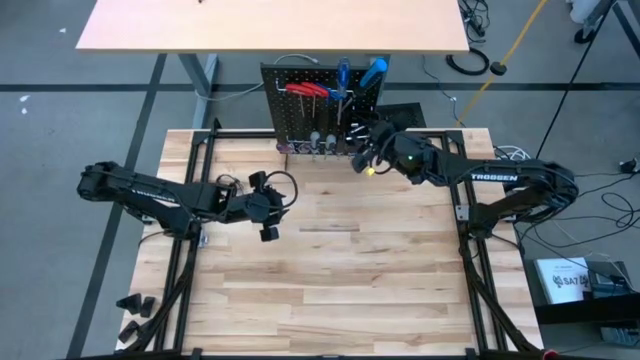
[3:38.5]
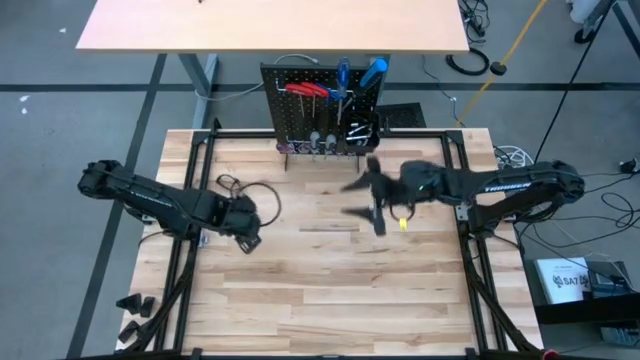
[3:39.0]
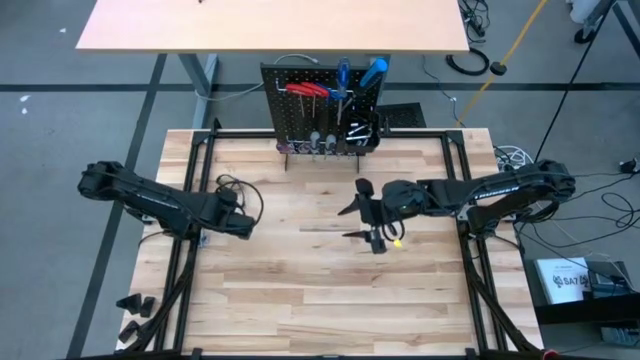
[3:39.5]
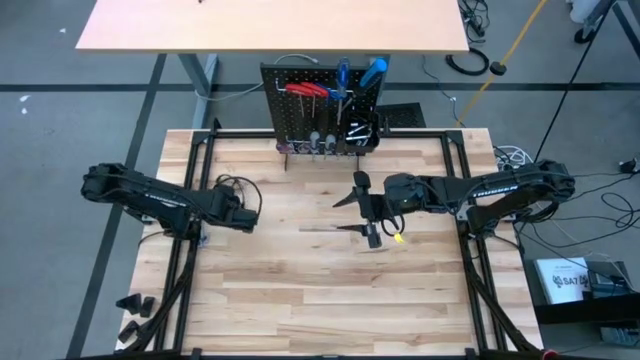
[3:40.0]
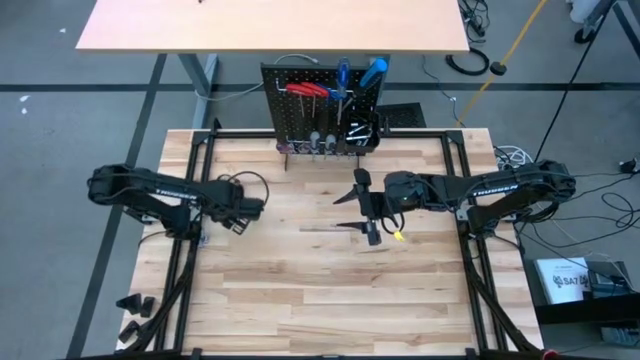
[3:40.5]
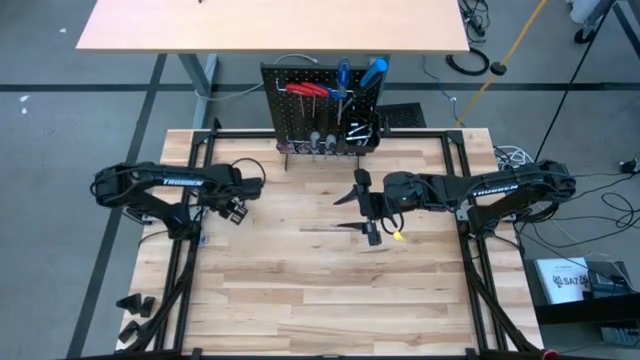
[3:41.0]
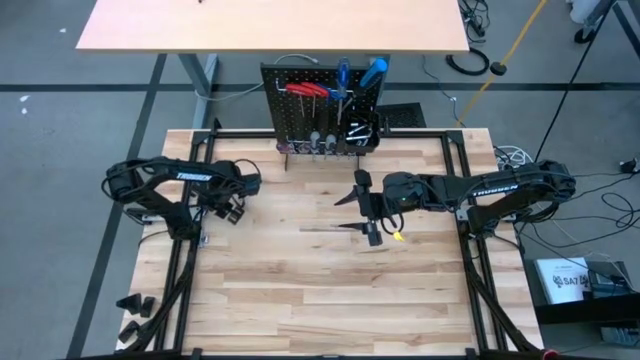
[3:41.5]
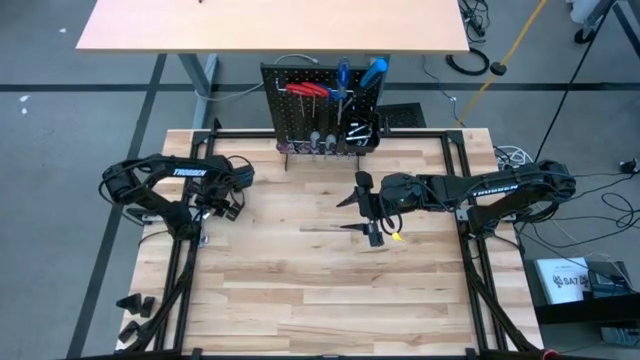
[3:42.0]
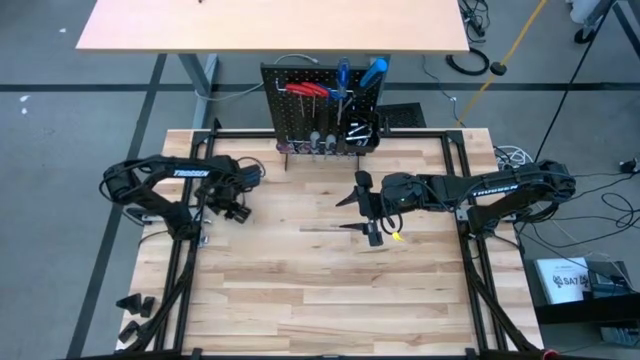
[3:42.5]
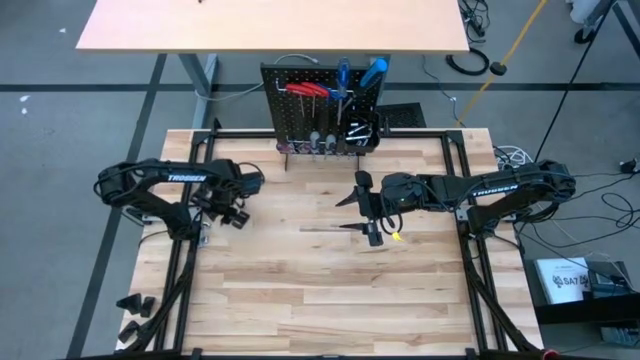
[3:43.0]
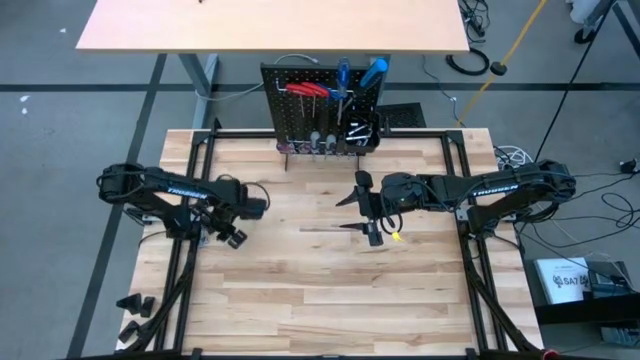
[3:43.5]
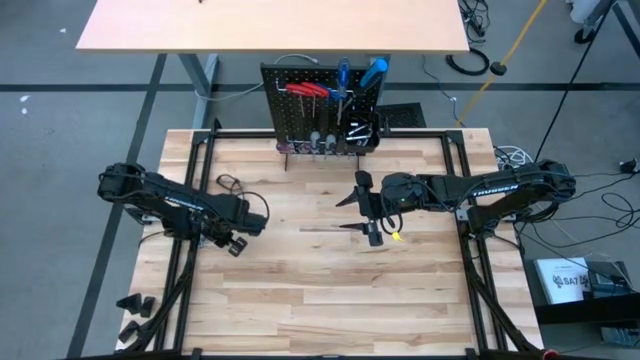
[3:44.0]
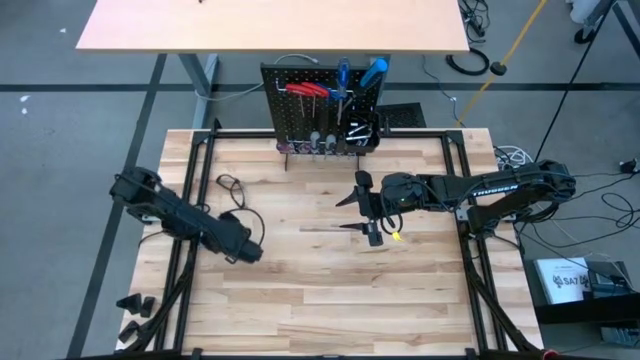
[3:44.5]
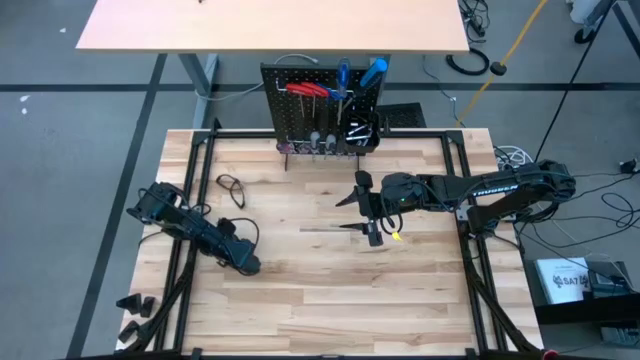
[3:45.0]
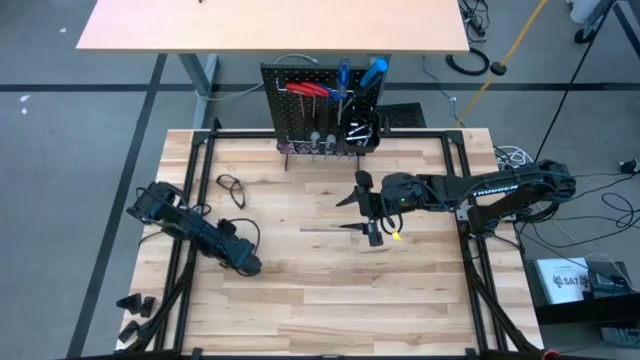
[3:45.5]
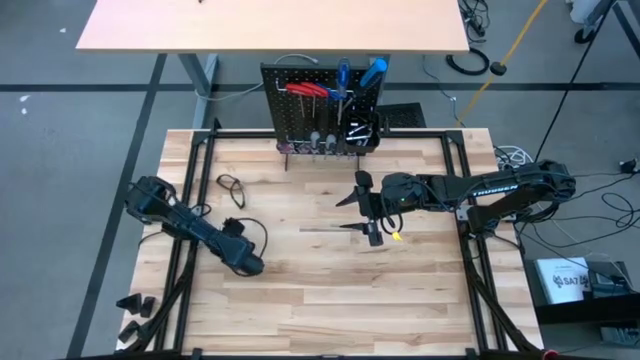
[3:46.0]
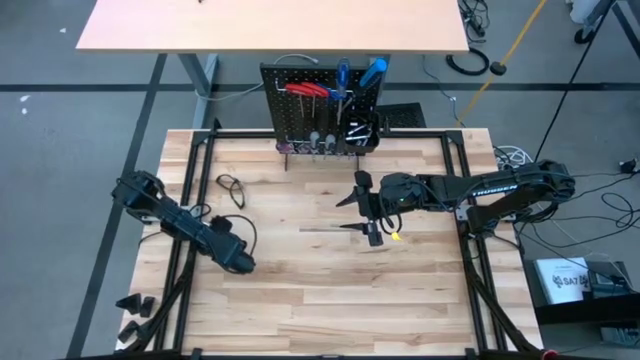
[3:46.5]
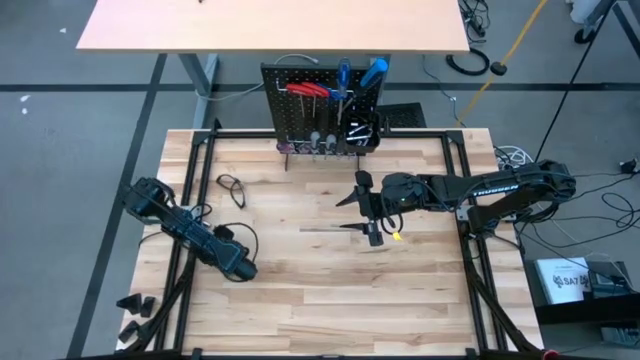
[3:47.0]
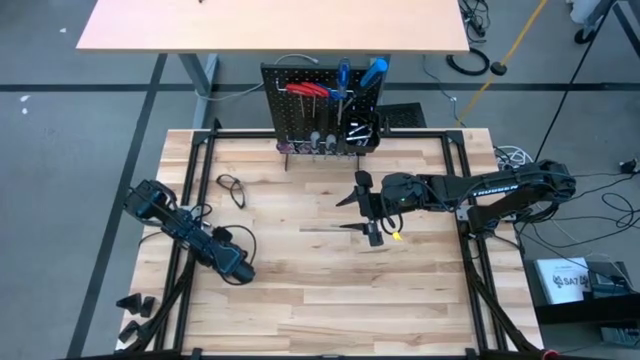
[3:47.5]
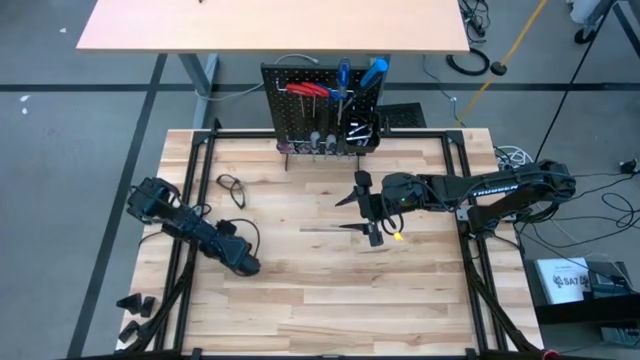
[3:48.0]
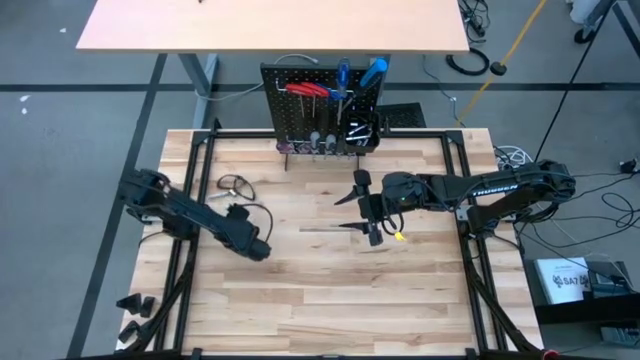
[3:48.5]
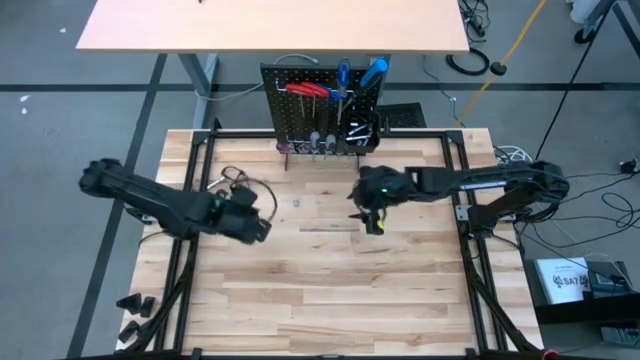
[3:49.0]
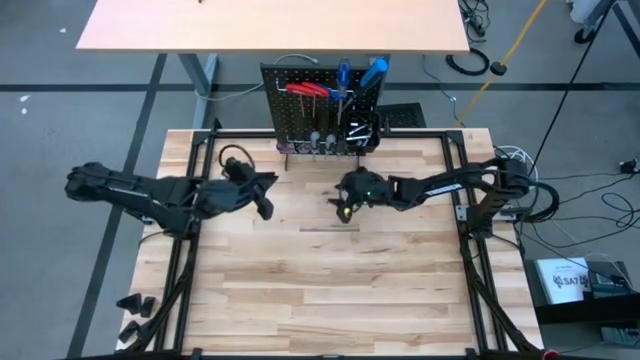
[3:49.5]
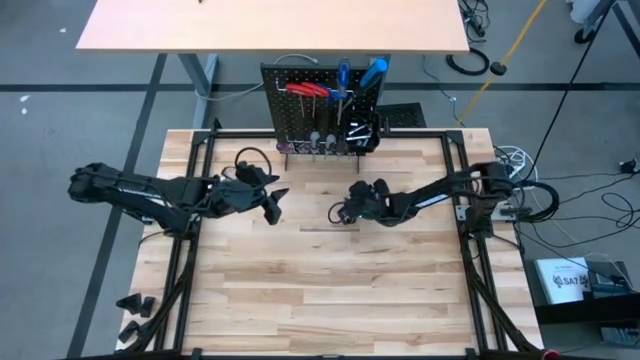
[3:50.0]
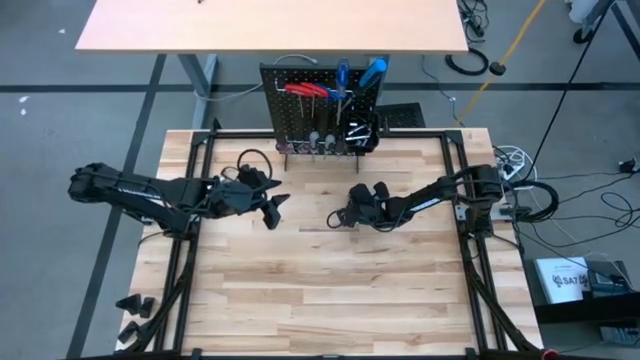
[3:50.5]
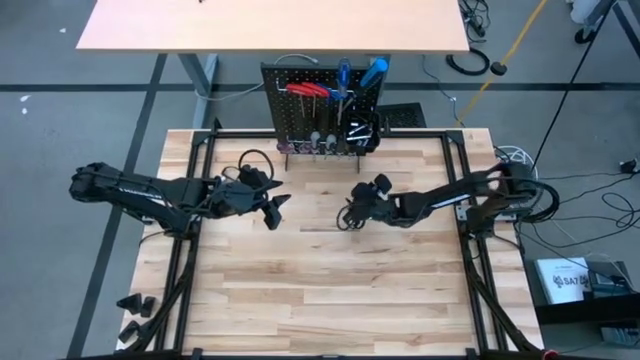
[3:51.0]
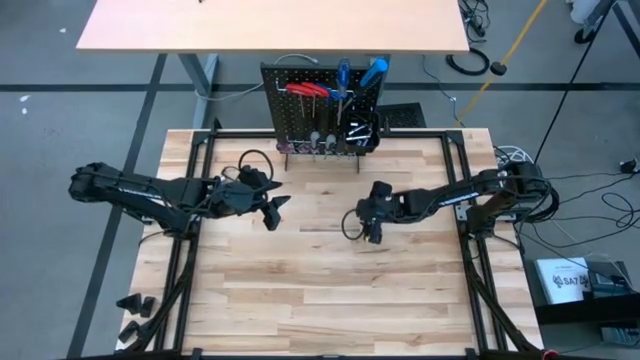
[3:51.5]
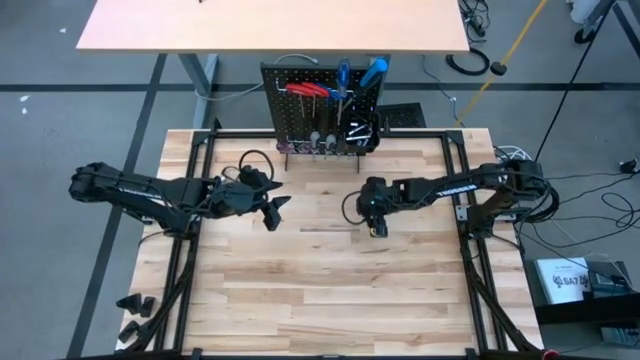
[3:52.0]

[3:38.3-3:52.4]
Task: Hang tools onto peg board
Put the socket wrench into the black bin on the peg board

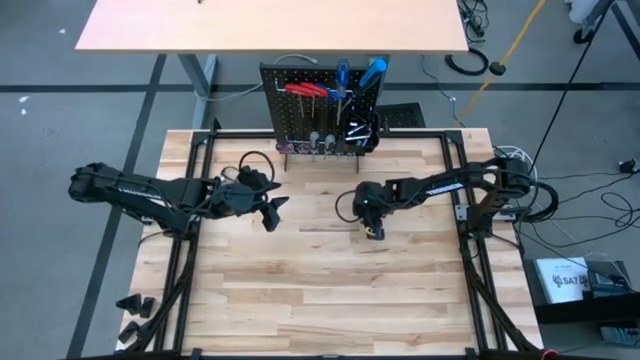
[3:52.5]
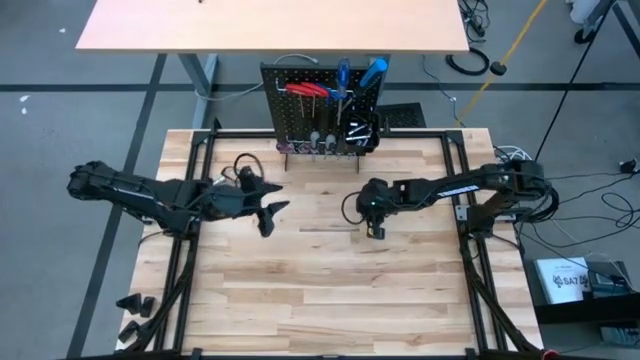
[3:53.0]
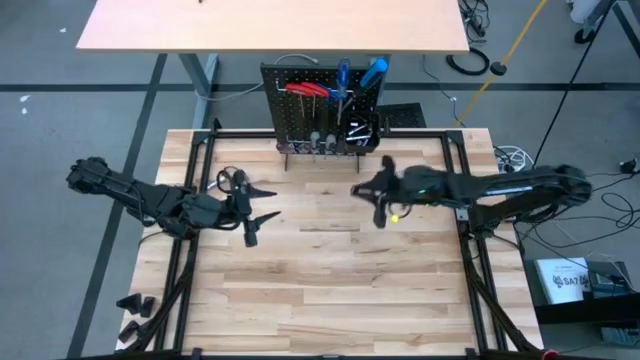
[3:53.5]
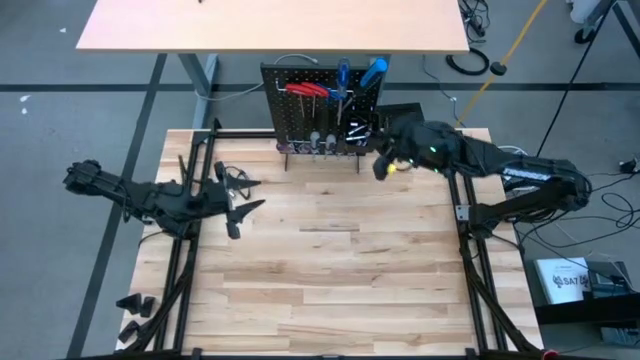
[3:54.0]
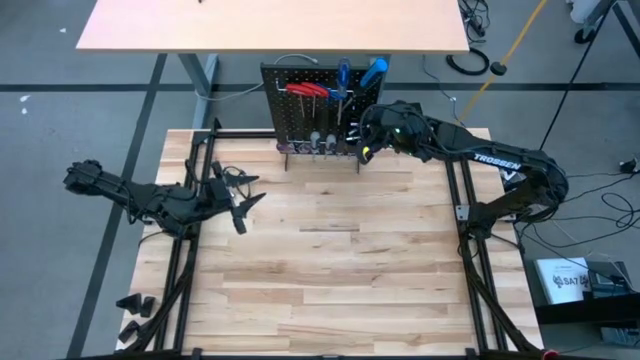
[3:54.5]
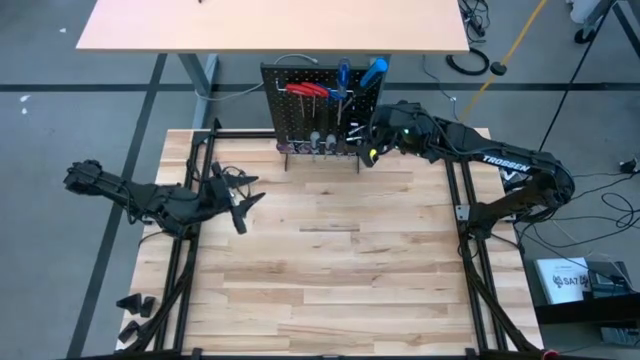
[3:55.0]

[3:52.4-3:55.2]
Put the socket wrench into the black bin on the peg board

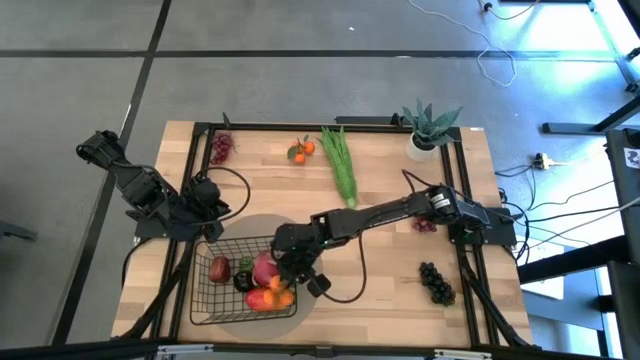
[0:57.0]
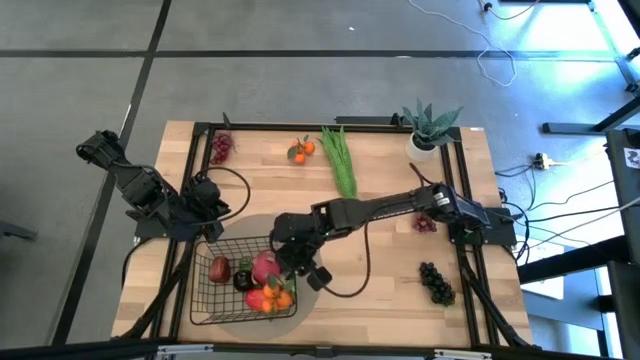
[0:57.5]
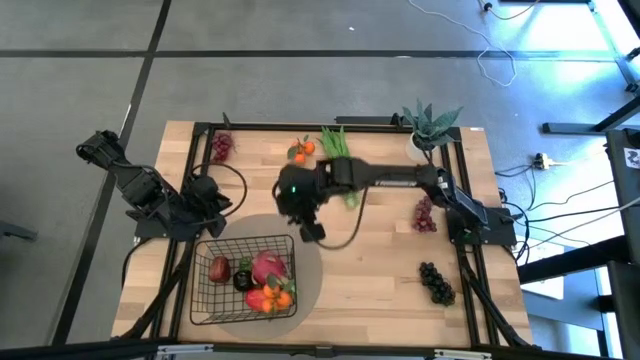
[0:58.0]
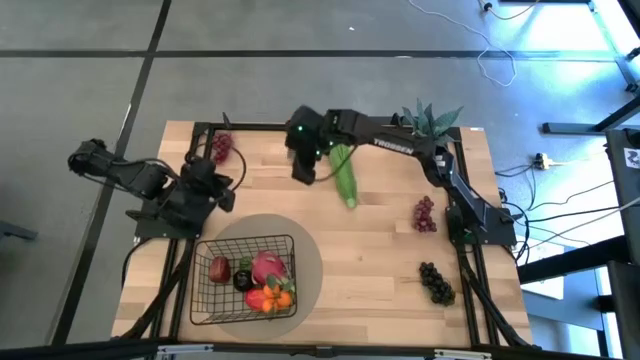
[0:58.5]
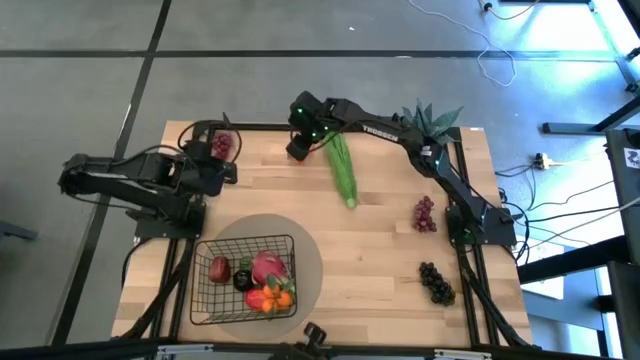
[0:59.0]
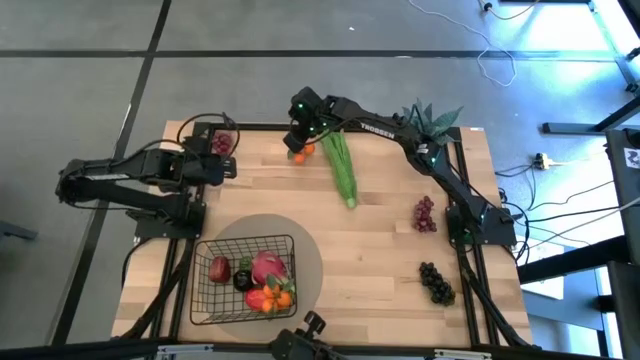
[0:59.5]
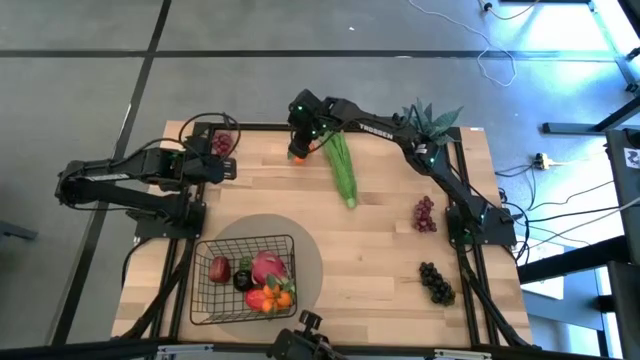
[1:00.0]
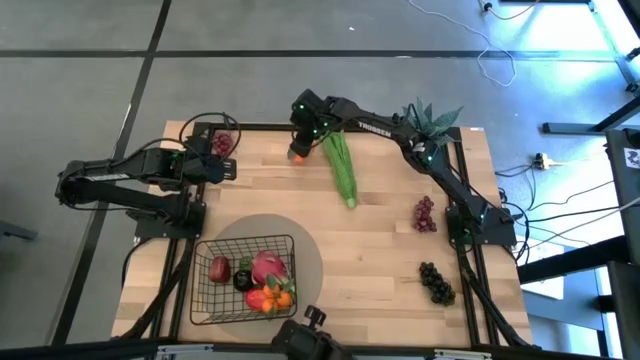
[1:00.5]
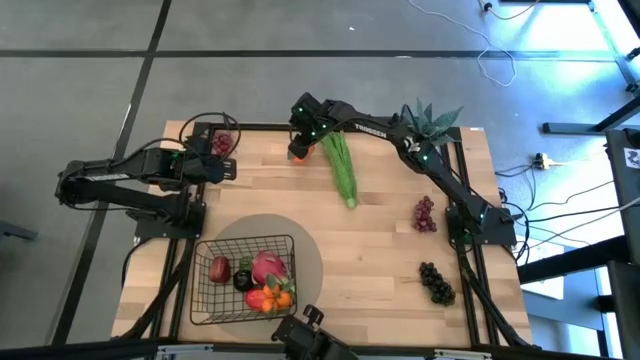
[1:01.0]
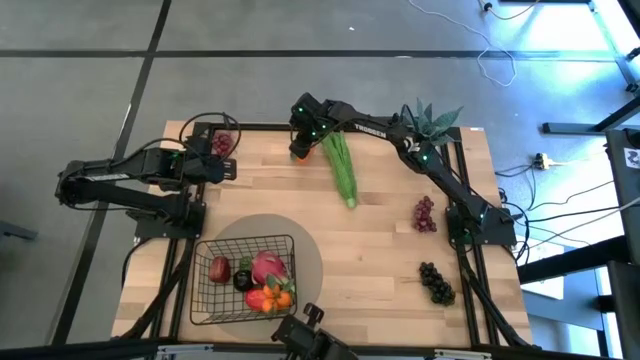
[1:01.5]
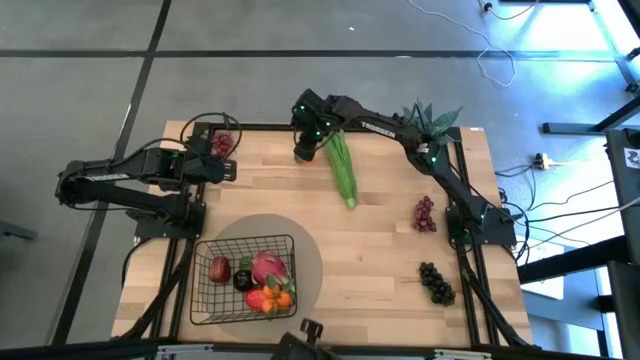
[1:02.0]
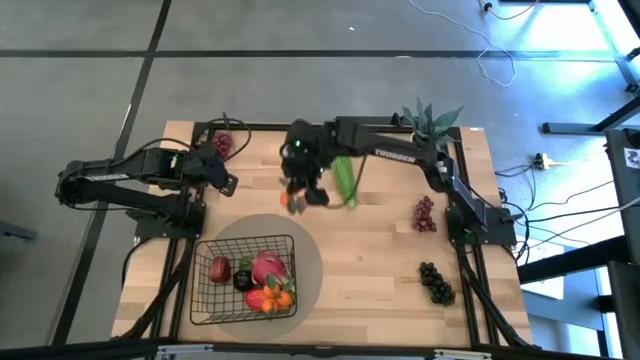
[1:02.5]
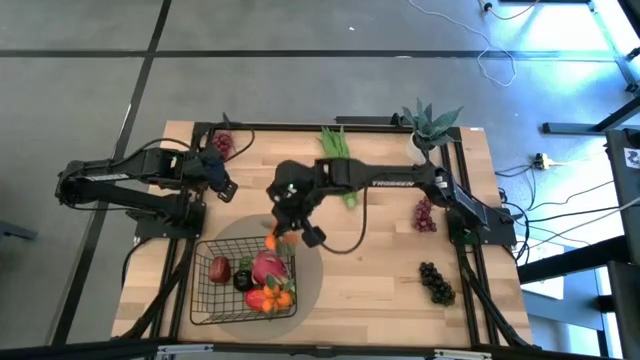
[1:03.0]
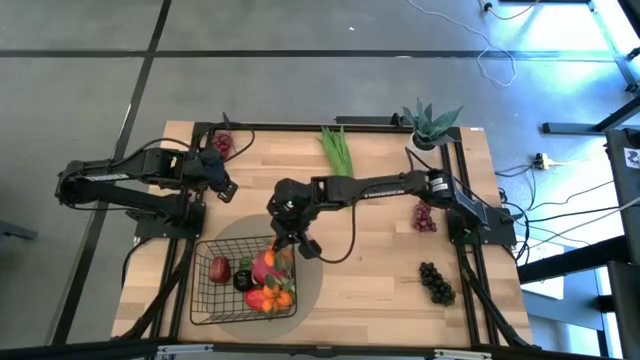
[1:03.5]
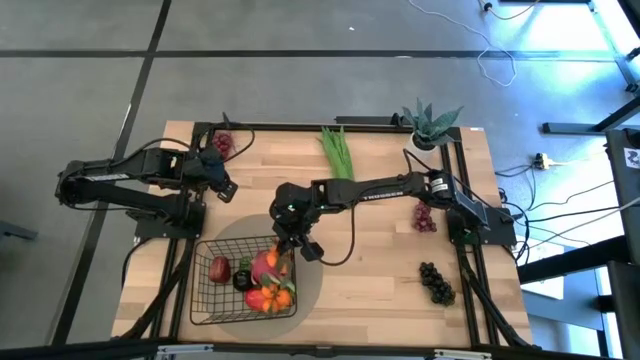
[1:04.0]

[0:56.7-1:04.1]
Task: Build produce basket
Put the tangerine into the black wire basket
